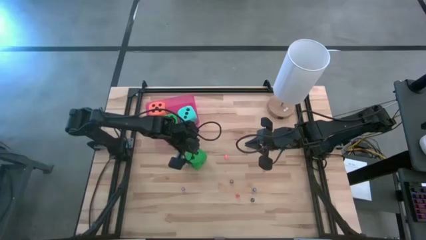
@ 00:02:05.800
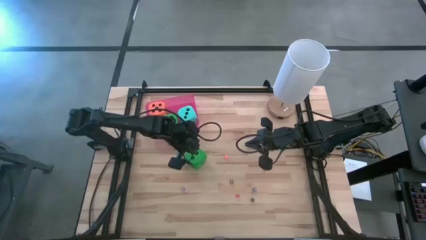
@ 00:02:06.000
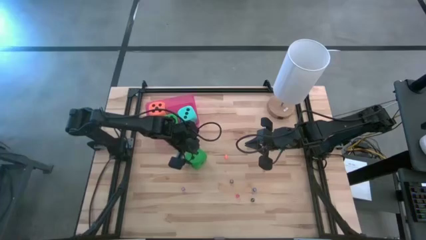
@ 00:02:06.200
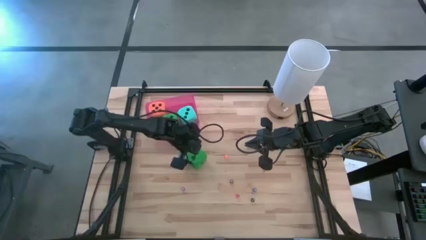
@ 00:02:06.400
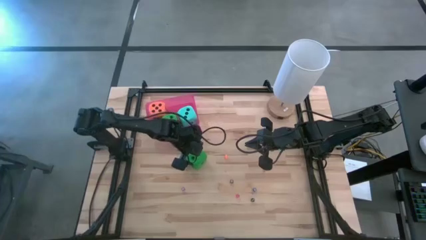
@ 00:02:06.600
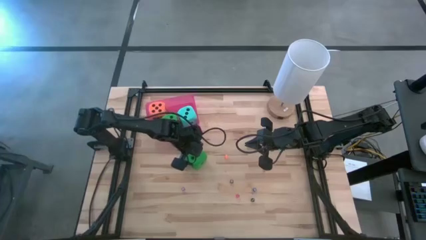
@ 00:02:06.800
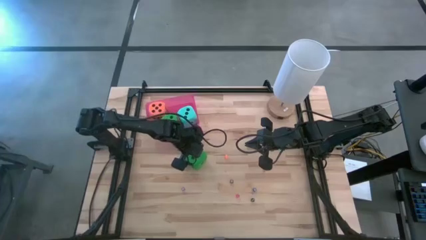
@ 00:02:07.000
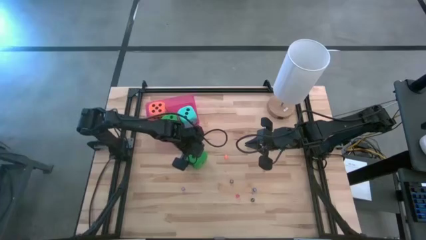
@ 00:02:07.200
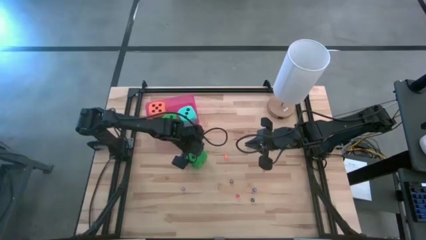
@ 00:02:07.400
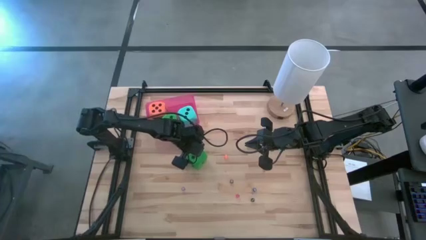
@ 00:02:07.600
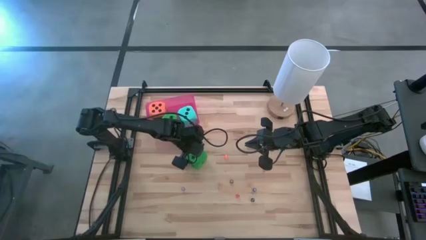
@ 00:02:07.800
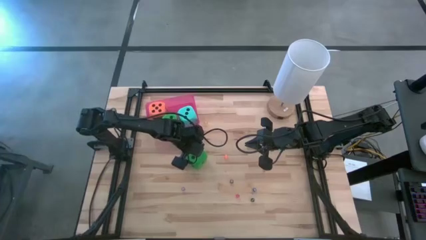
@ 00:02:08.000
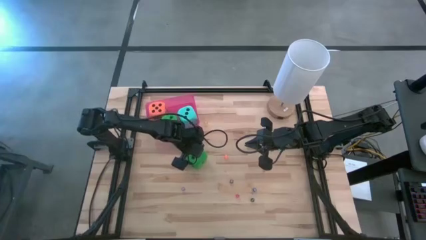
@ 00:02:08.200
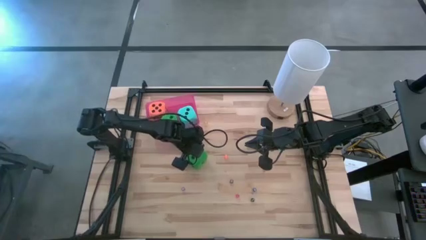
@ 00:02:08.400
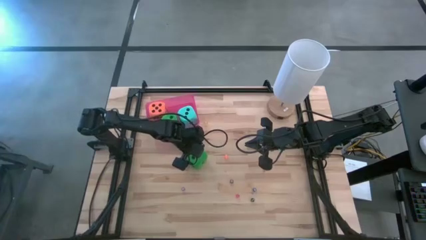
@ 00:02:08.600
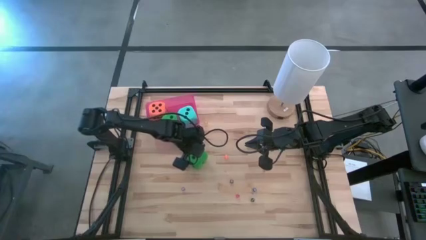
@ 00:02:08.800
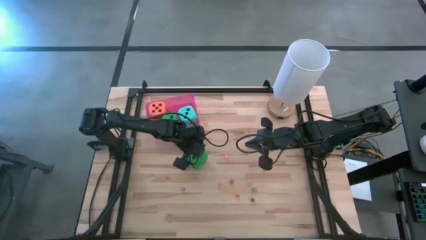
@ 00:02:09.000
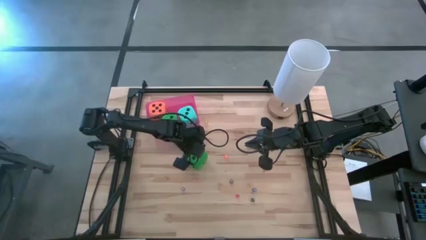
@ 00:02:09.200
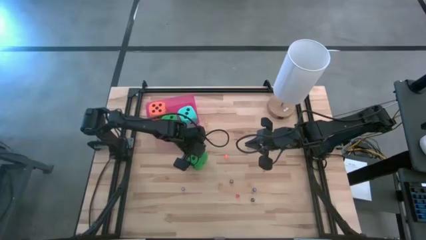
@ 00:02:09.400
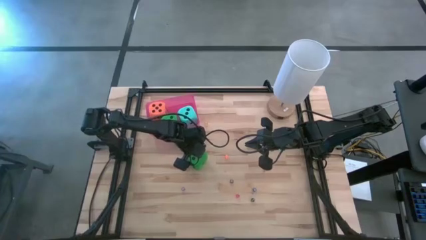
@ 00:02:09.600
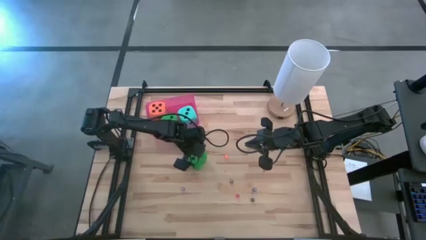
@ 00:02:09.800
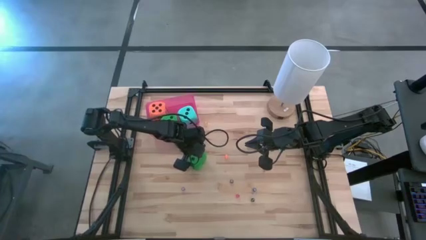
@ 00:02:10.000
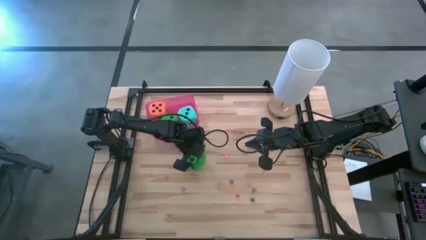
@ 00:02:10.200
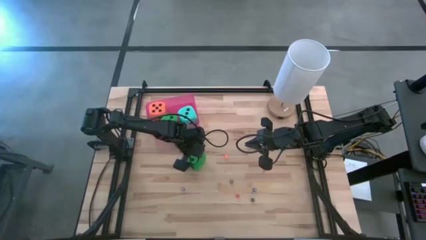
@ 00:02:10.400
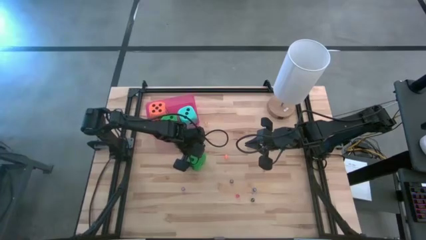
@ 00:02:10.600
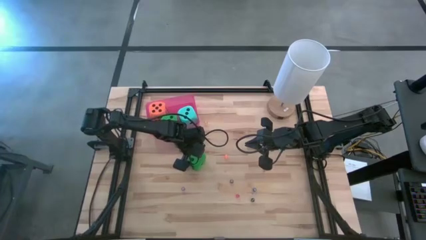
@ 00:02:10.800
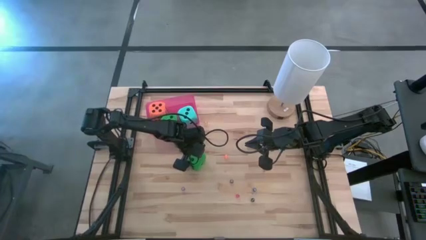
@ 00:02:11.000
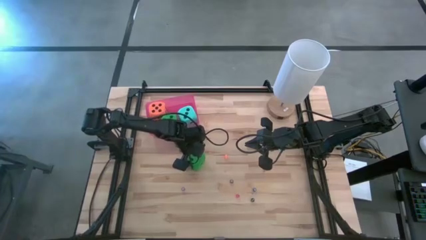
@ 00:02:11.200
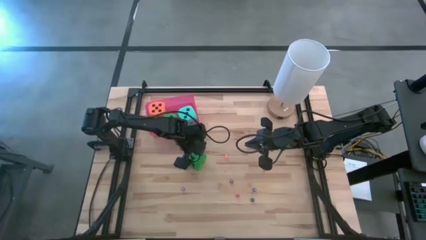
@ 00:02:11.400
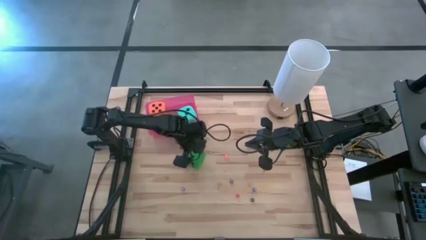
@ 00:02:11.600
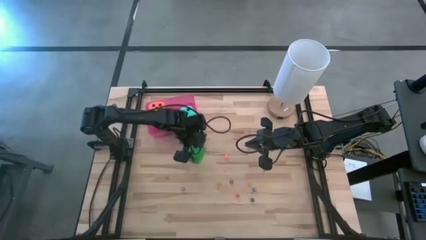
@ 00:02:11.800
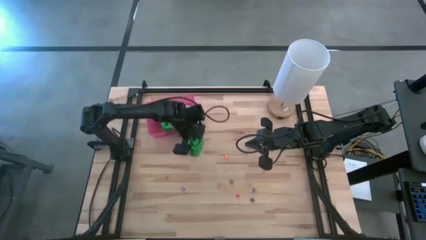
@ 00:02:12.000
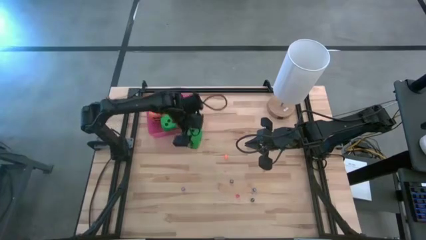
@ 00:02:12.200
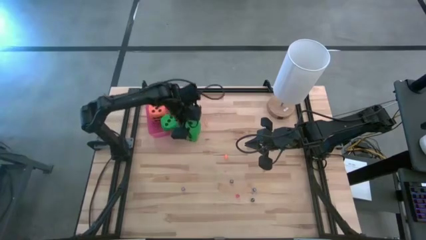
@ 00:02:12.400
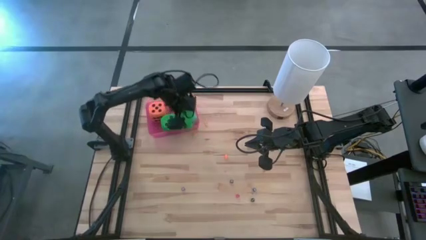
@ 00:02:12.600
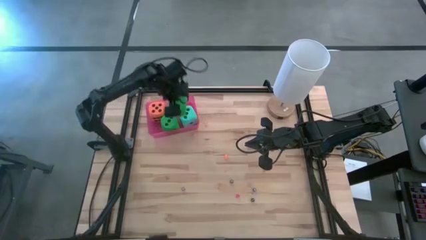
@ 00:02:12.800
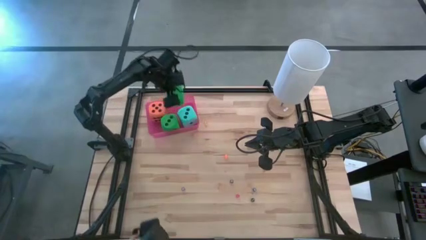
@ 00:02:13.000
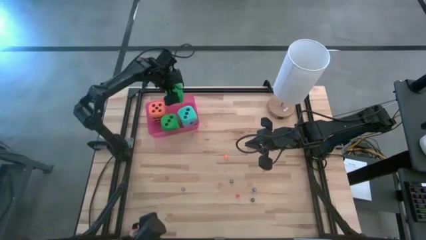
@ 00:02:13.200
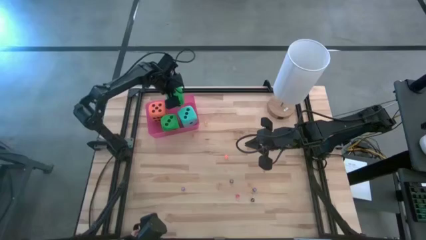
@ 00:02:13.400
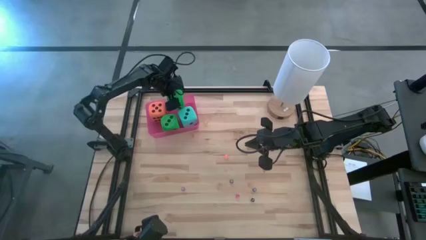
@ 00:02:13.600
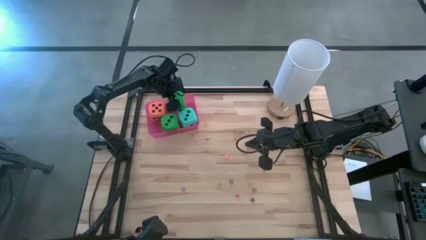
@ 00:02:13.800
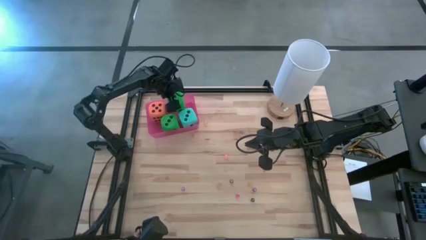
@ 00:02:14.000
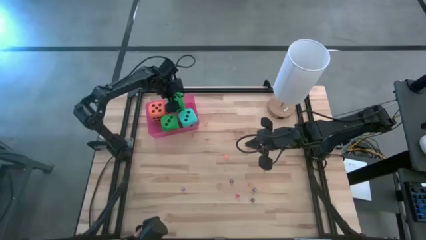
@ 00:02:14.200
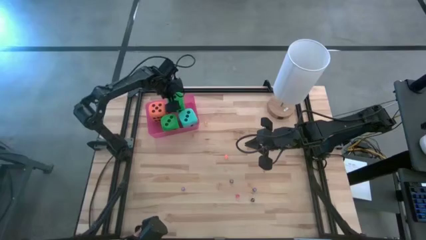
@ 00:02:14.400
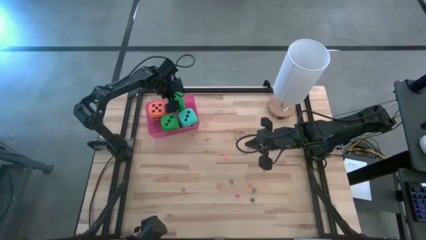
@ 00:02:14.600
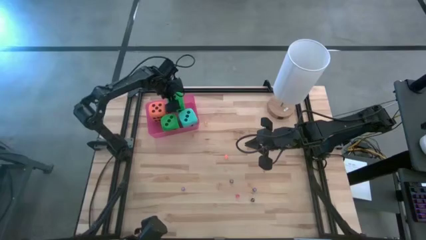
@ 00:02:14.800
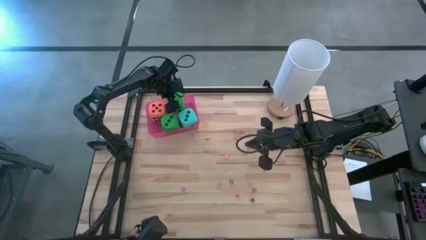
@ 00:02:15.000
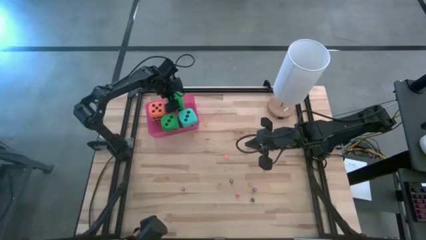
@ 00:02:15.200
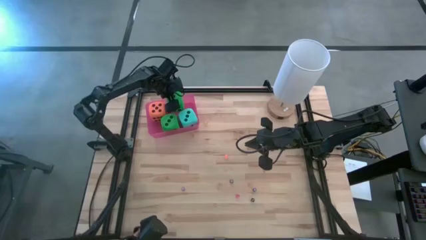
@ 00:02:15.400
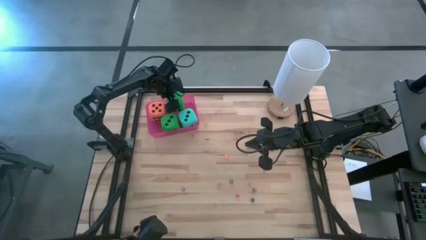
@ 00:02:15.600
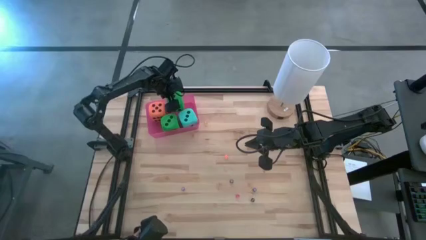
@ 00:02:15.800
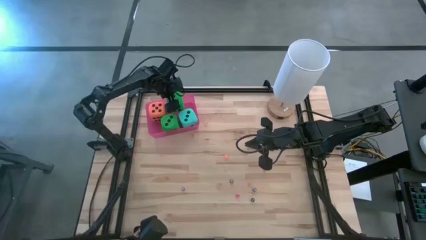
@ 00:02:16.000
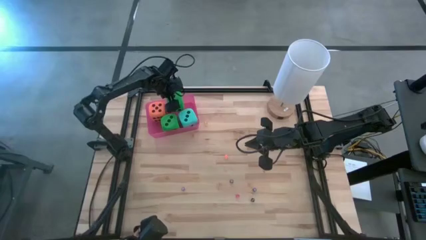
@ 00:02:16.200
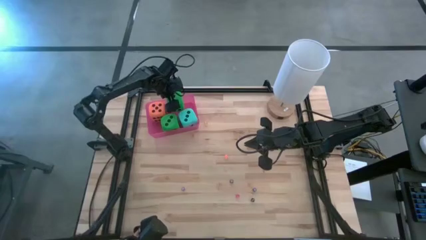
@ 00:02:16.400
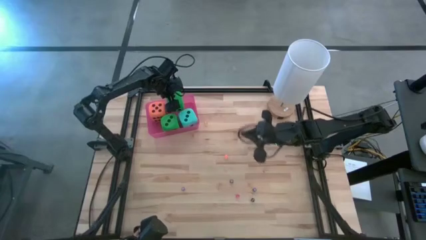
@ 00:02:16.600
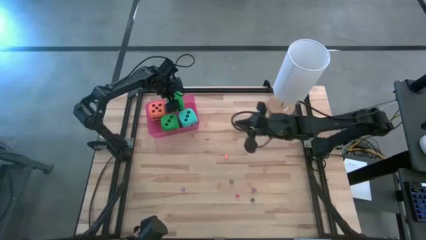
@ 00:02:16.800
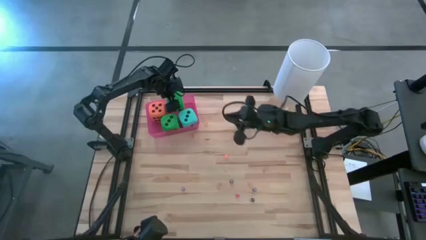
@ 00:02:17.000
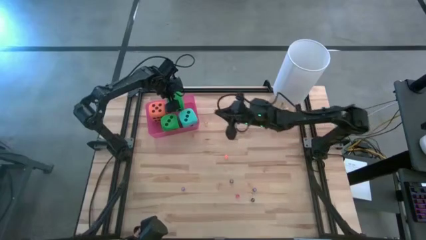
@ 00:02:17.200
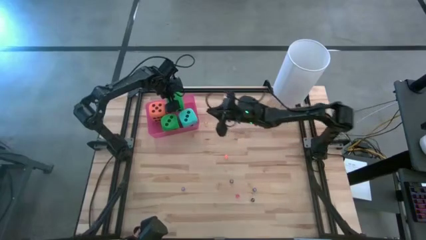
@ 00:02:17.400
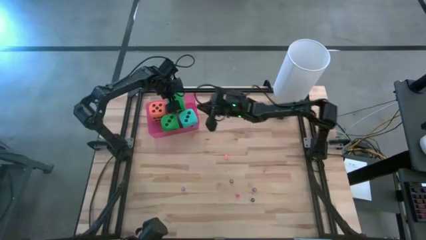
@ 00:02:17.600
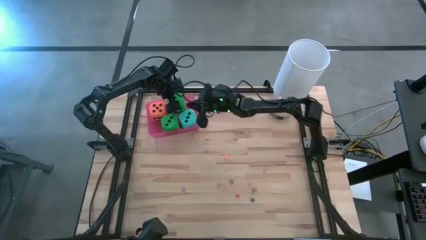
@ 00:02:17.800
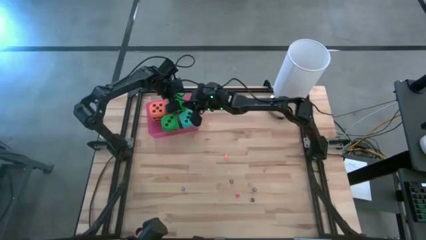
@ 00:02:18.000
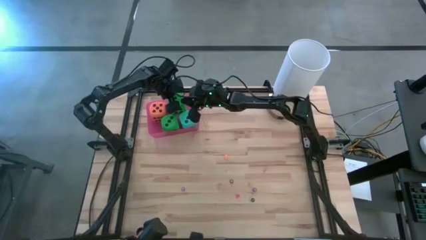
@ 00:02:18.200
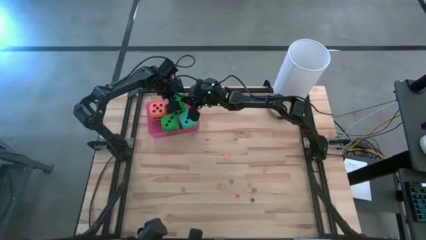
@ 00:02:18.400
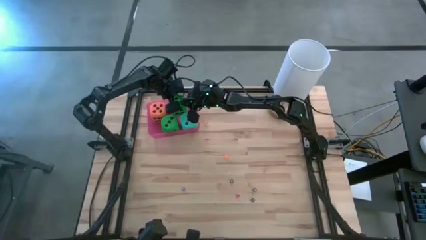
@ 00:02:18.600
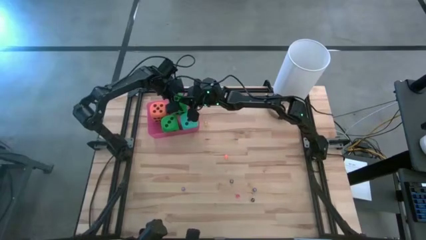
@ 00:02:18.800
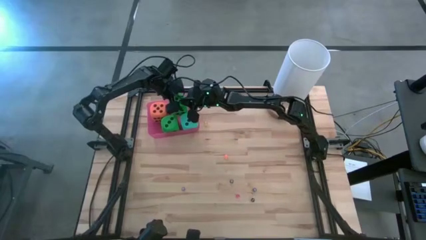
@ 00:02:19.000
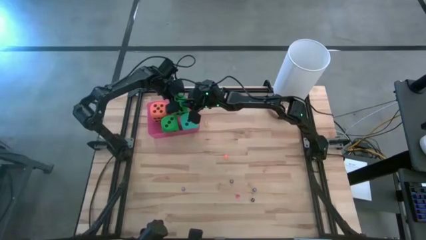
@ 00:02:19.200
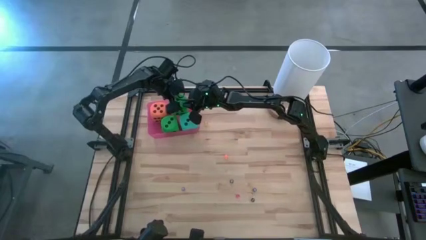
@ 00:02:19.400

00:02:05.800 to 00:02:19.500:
Task: Pick & Place Dice
Put the big green dice into the red bin

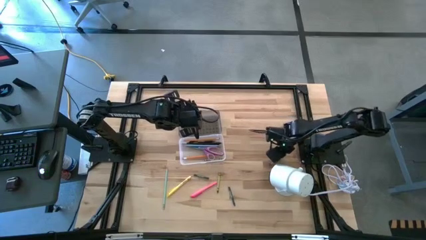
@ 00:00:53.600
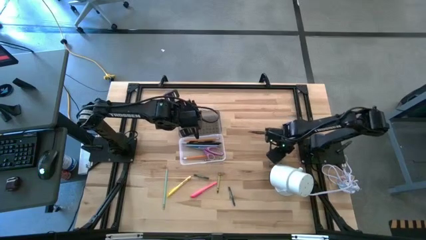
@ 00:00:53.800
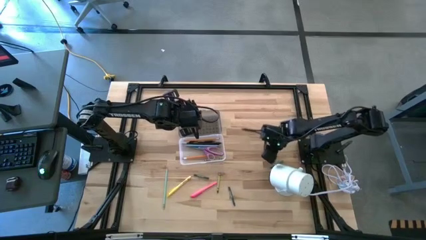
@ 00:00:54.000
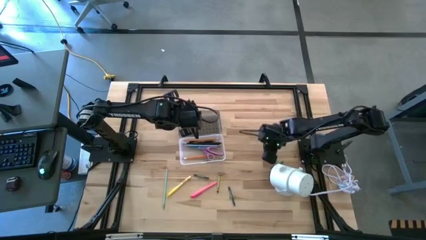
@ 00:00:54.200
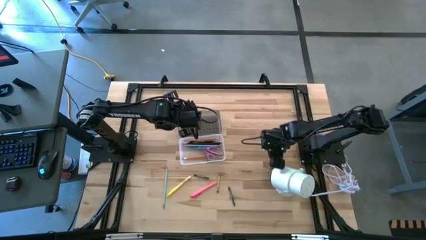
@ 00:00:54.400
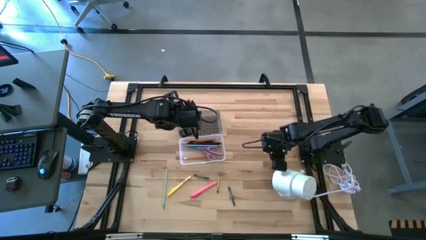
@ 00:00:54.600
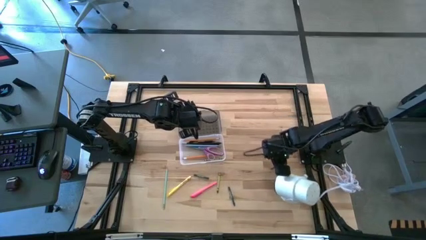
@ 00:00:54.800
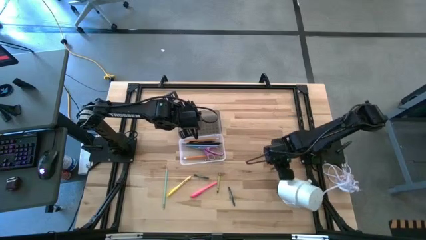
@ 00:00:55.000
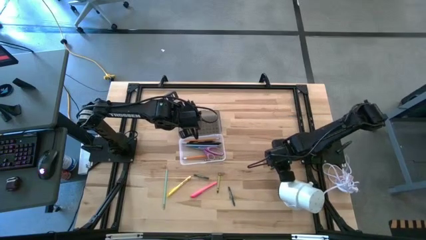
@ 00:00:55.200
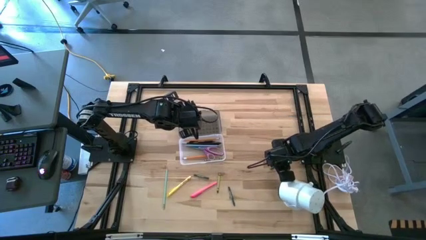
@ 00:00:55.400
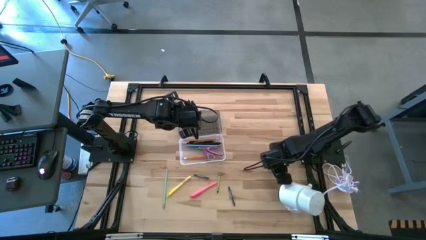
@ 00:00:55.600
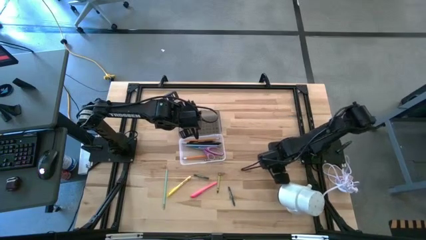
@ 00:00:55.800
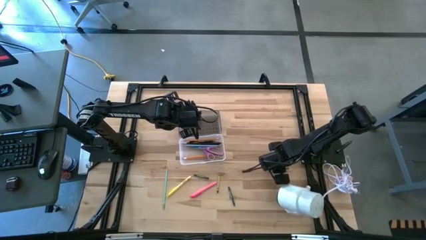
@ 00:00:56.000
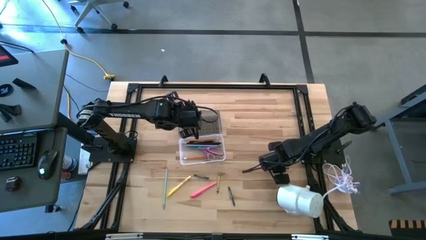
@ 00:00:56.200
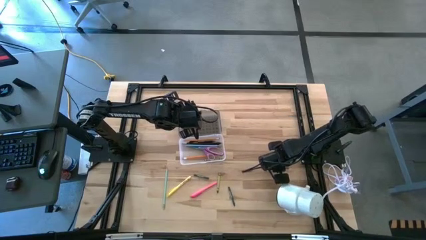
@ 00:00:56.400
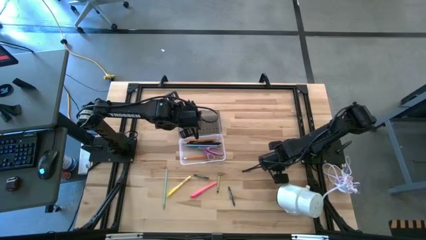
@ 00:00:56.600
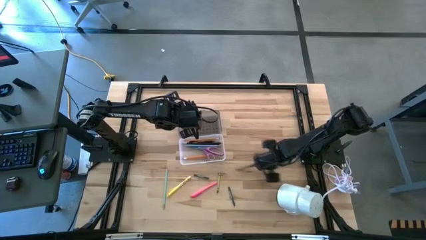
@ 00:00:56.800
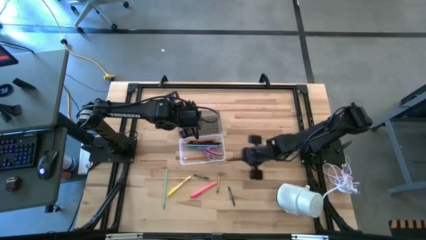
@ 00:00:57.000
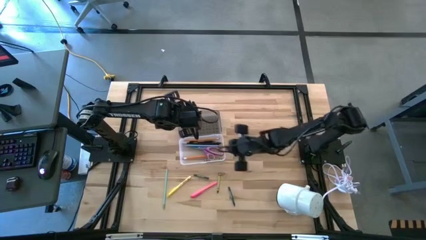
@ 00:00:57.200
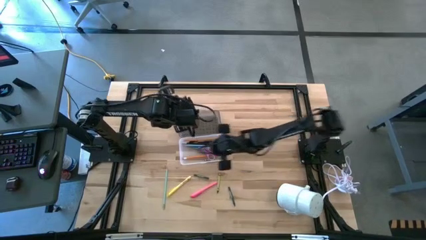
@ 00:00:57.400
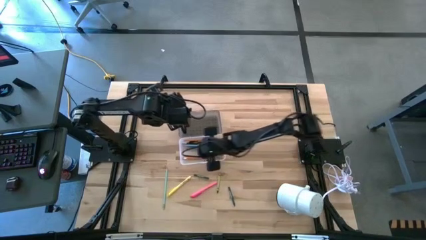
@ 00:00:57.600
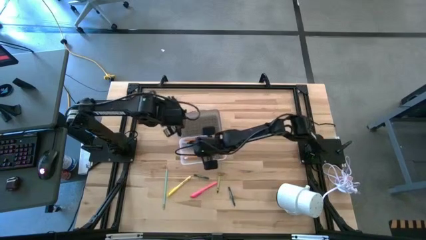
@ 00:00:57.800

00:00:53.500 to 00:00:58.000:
Task: Pick & place school supplies into a supply box
Put the dark green crayon into the gray supply box
